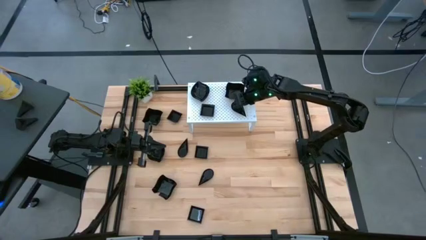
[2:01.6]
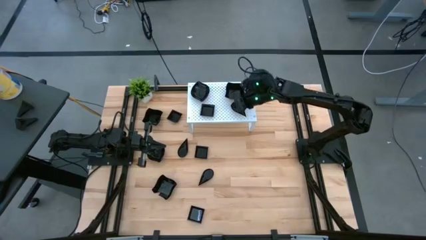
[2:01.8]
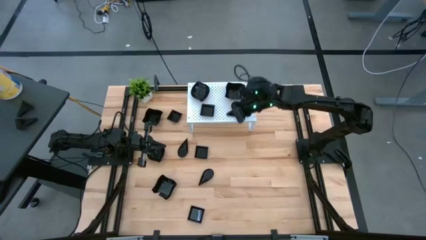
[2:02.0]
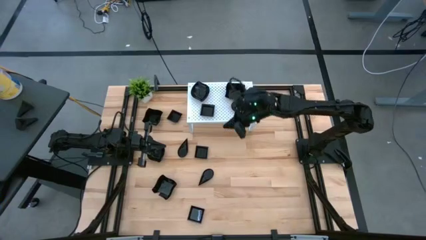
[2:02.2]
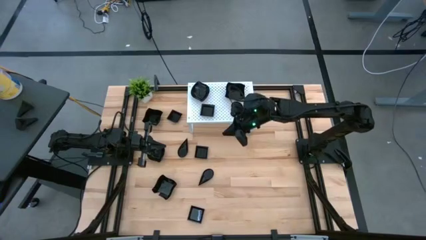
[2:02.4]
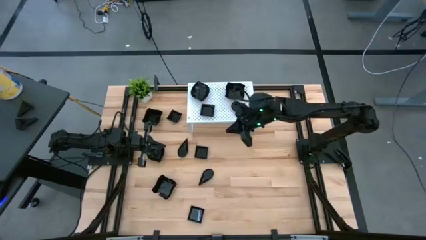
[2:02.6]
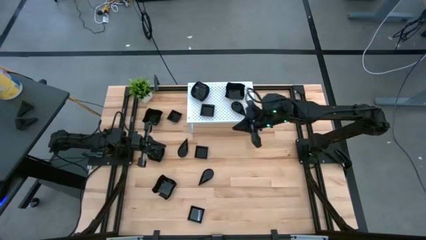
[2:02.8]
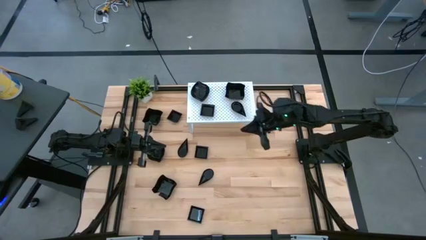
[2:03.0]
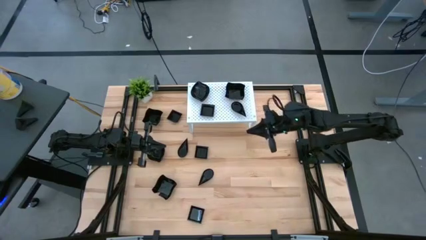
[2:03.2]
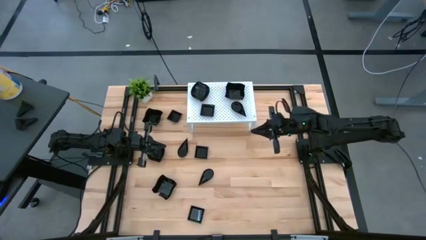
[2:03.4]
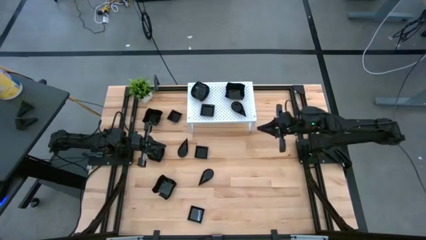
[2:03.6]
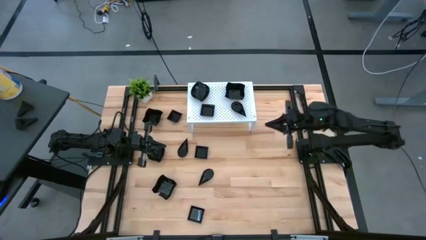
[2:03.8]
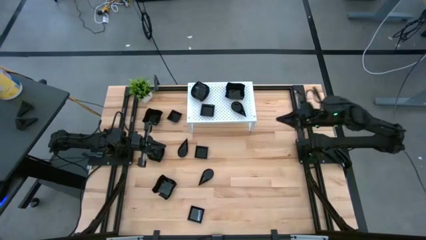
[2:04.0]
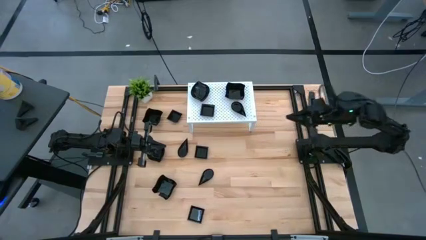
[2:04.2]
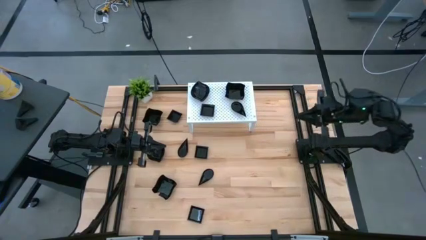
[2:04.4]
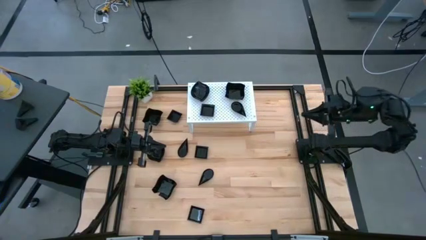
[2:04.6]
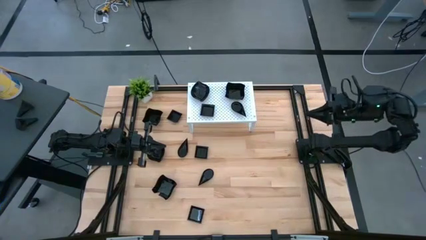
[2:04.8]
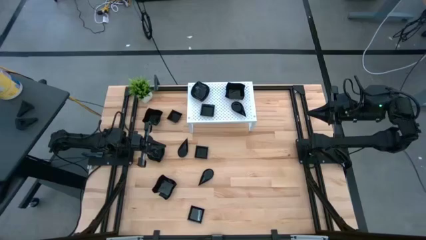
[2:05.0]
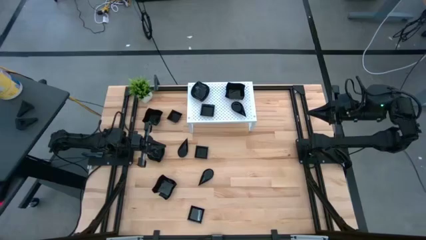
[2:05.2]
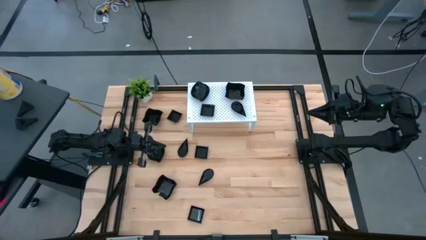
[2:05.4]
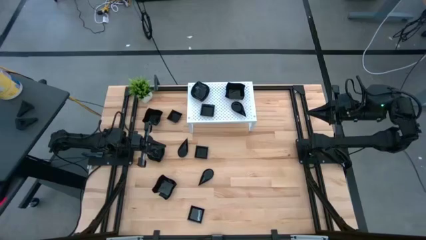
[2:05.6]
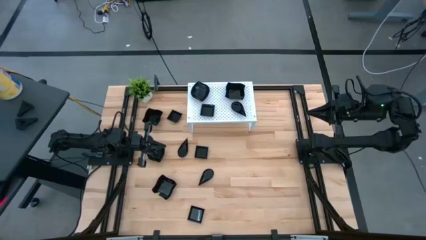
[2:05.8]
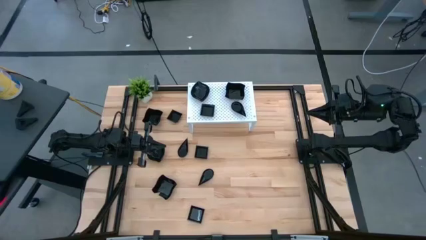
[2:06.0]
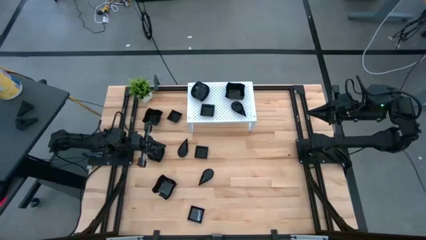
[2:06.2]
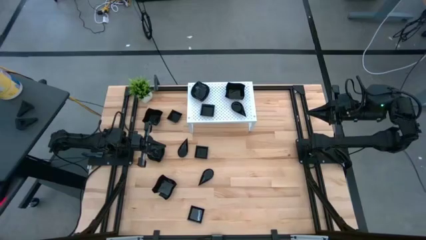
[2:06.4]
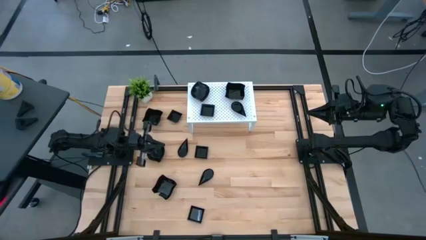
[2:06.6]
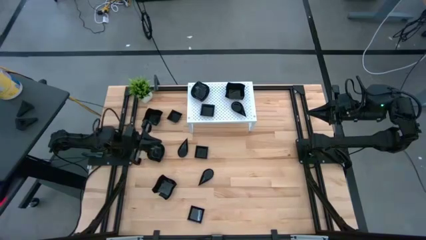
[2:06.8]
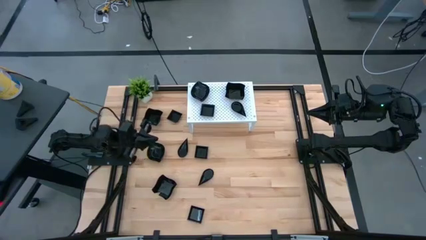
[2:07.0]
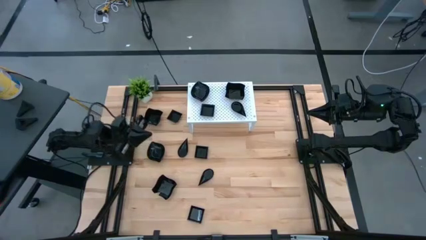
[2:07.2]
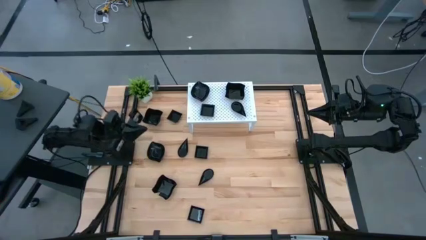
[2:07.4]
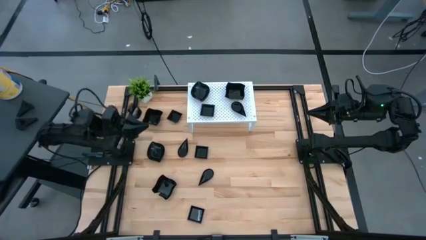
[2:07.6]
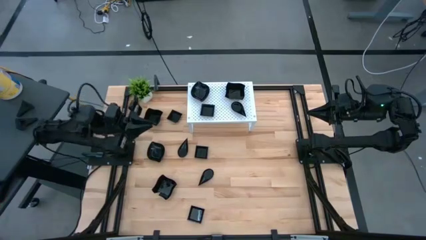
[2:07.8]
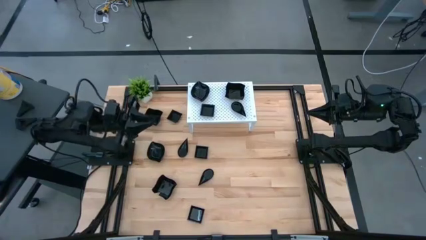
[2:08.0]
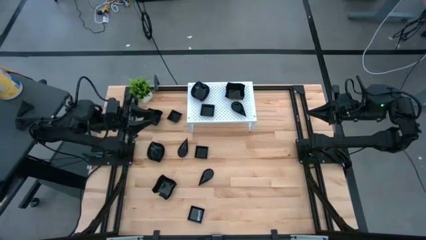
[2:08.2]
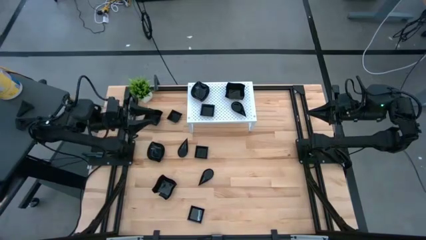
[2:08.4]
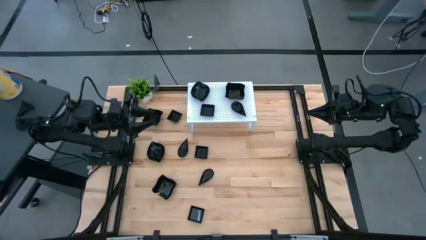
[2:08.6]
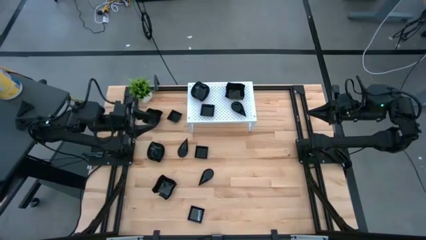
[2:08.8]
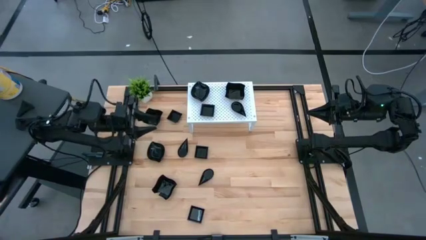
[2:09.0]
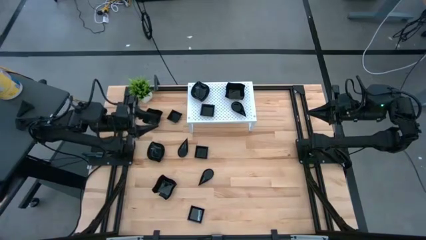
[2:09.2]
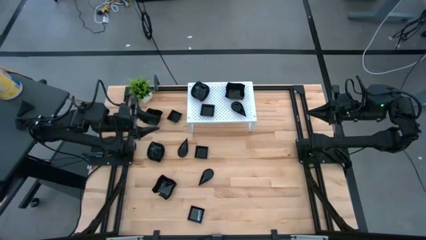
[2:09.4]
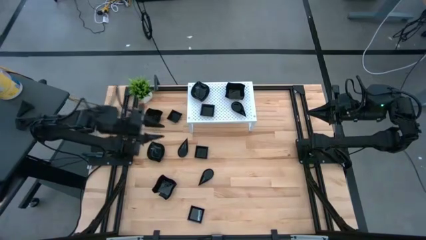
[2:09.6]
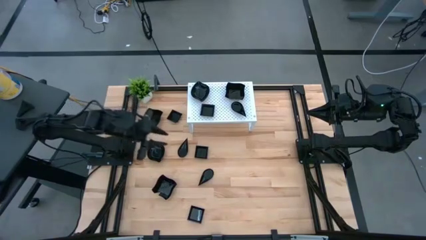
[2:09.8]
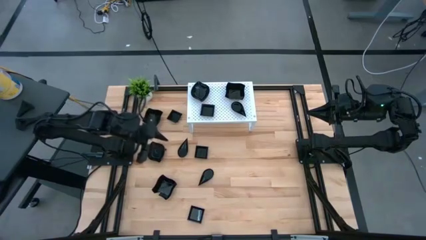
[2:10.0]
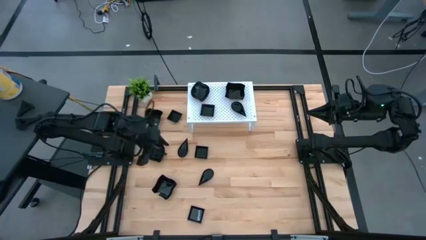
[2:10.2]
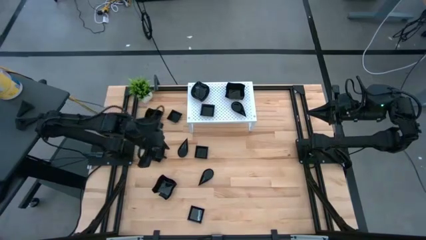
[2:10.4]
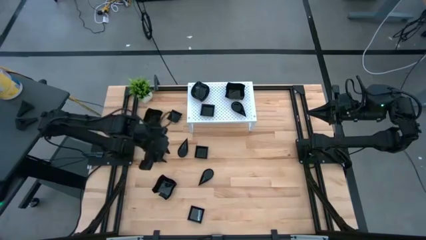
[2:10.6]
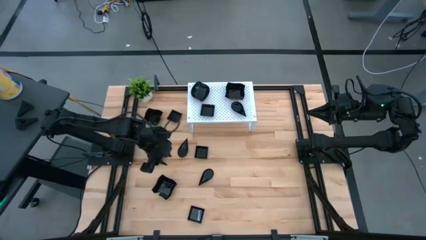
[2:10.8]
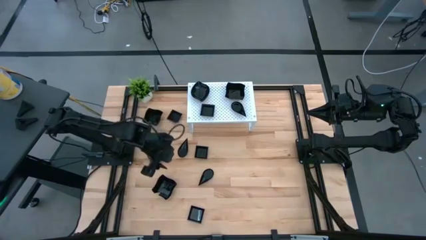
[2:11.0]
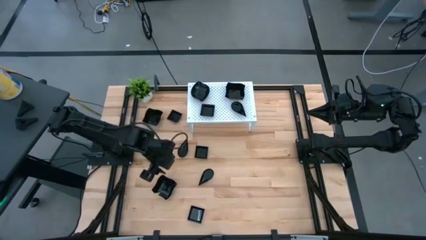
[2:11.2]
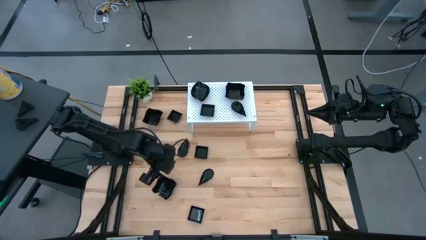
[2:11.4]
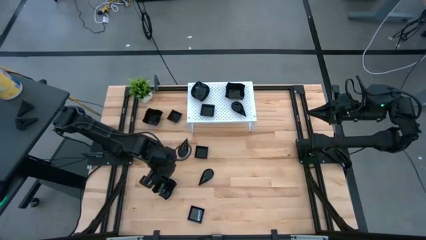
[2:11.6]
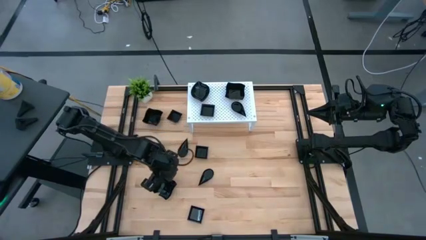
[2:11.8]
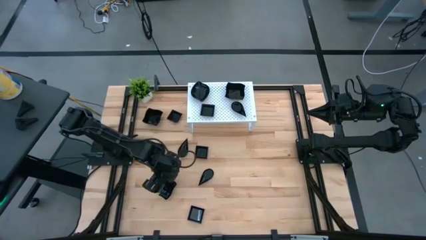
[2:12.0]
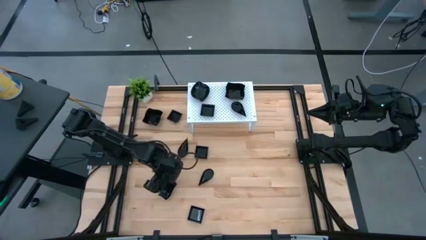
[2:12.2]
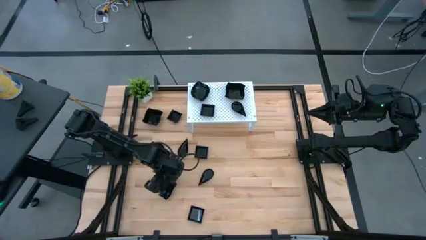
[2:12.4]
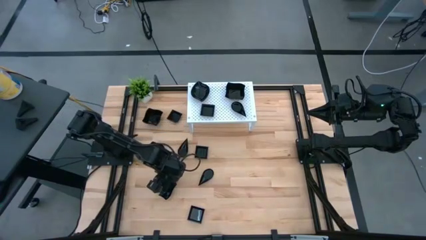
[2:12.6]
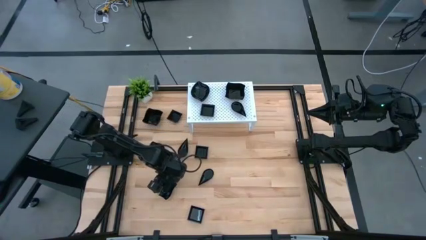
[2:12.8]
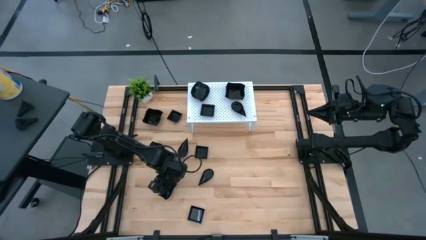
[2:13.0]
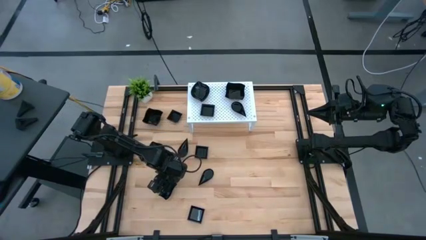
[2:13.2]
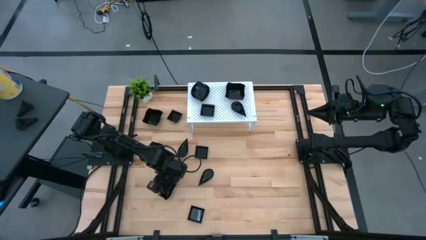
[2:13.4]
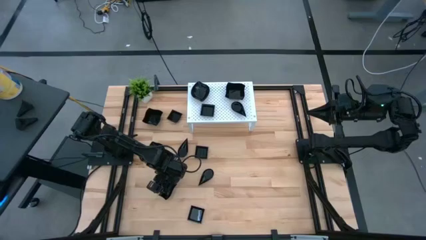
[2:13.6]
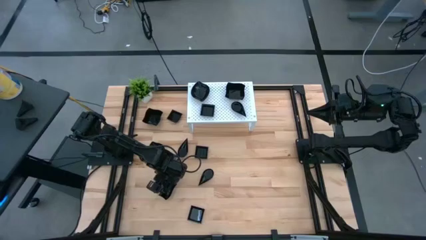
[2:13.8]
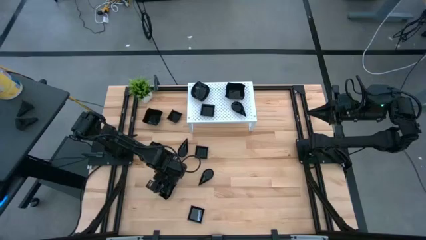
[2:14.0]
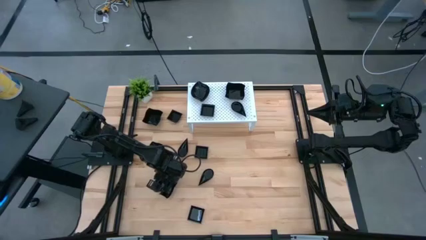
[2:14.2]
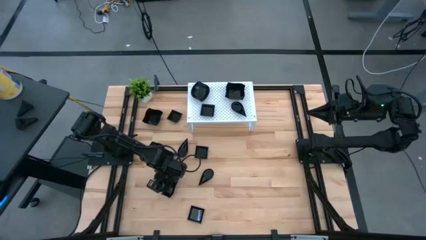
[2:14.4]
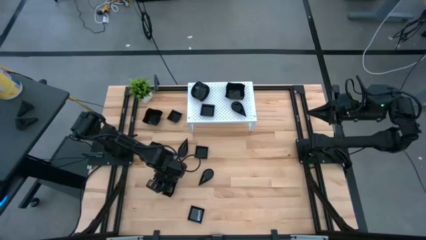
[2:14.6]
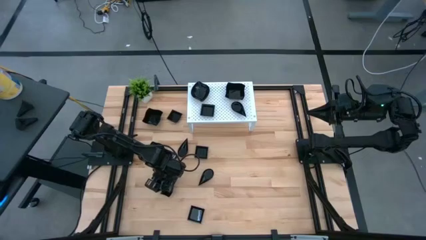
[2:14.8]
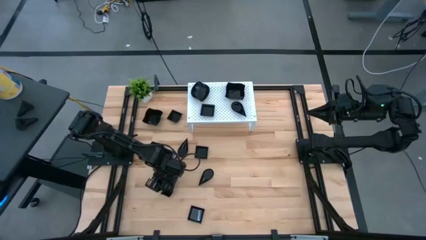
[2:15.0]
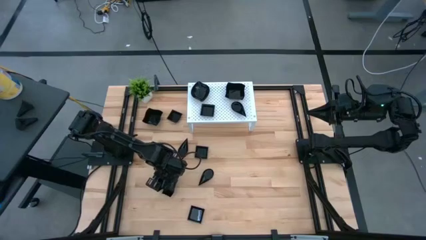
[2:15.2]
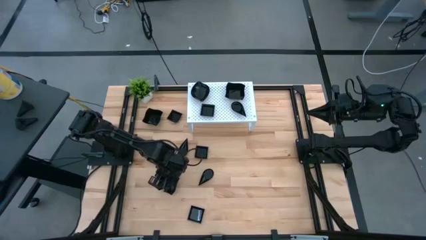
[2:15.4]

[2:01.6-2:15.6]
Task: Pick & Place Mini shaped plates
Stack the distorted square plate on top of the distorted square plate on the shelf

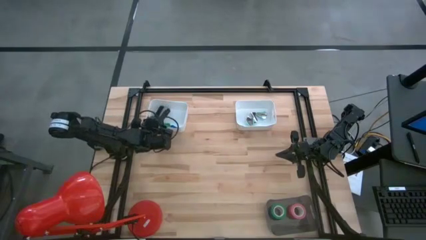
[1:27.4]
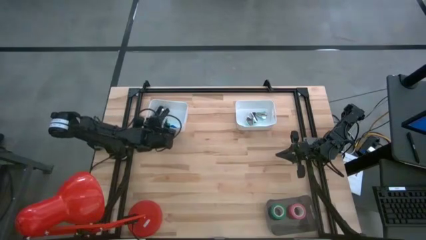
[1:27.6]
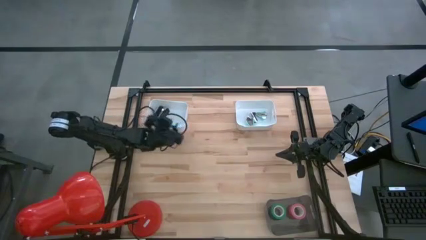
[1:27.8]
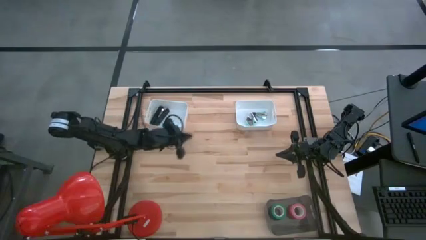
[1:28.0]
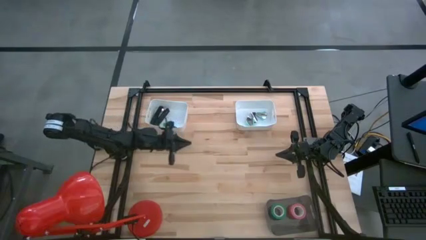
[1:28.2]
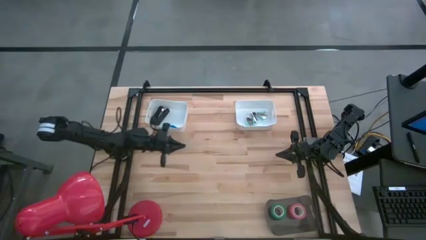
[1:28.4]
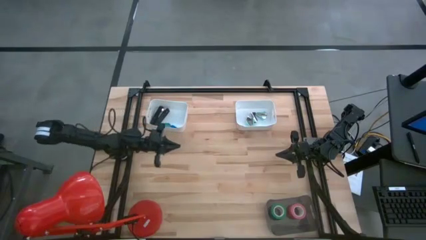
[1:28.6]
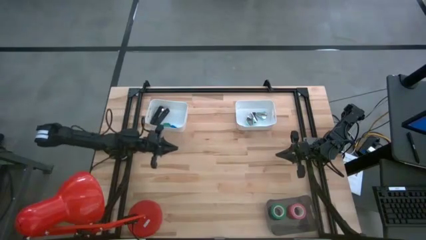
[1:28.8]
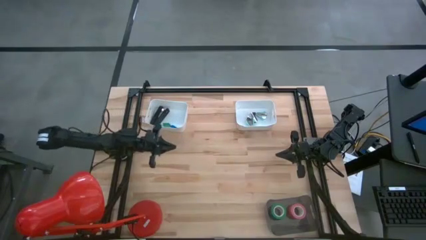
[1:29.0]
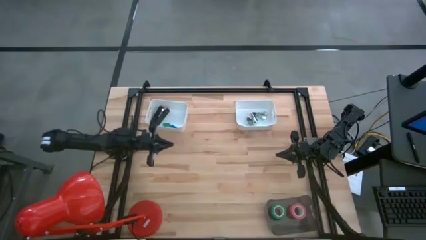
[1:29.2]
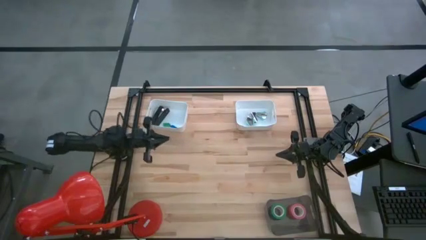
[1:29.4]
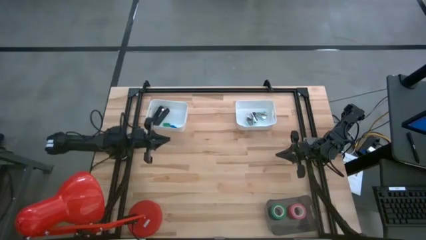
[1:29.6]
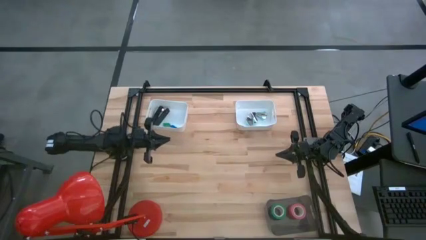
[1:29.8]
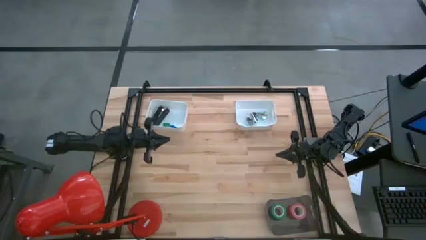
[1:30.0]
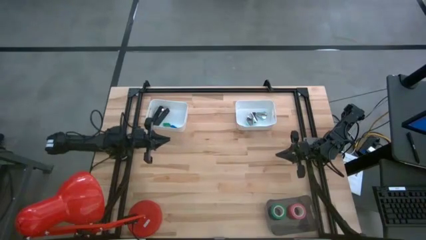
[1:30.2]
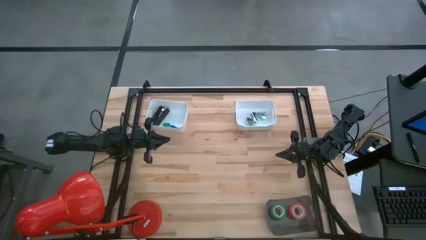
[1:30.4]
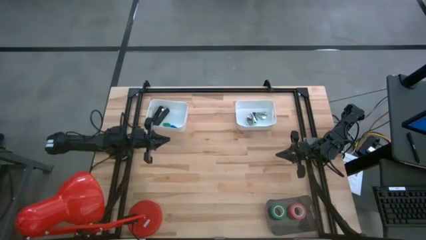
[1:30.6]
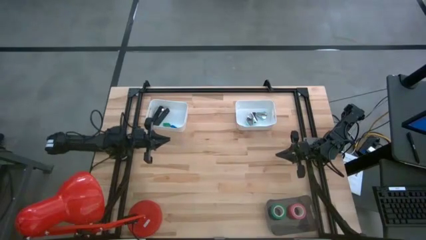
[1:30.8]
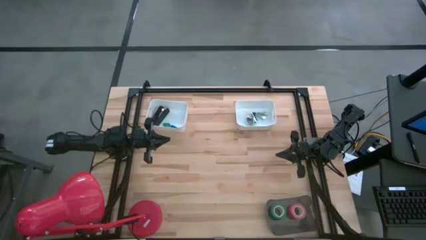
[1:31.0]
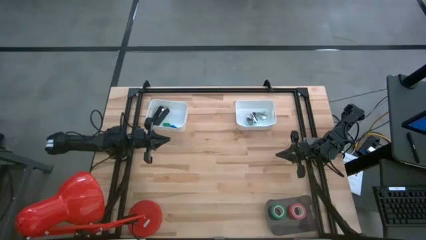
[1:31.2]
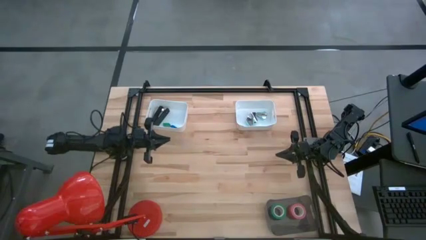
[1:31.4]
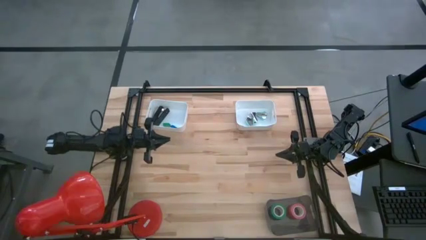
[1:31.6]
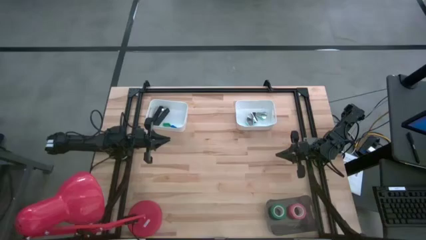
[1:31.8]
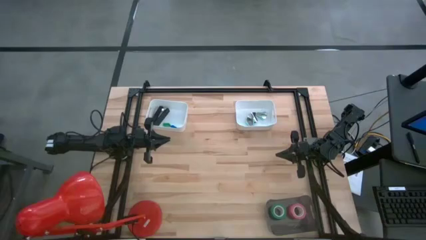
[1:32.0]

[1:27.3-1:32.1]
Task: Pick and place Stapler, Stapler remover, tape
Return to Home Position
